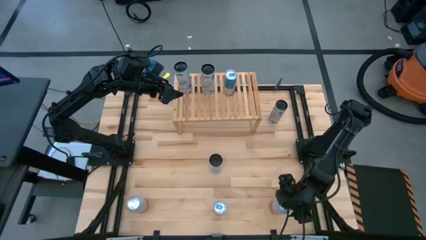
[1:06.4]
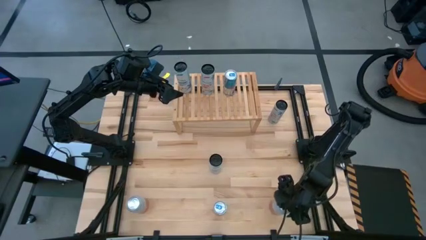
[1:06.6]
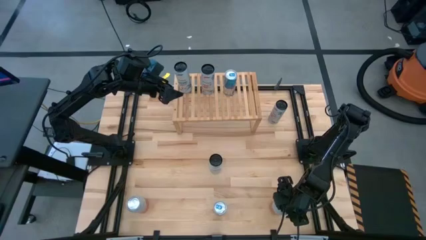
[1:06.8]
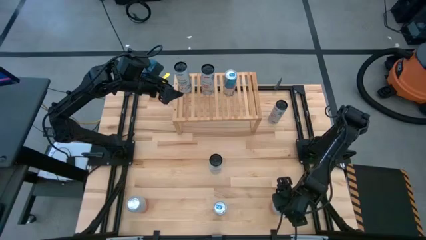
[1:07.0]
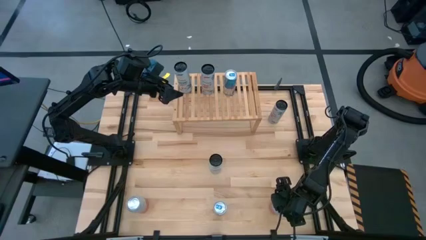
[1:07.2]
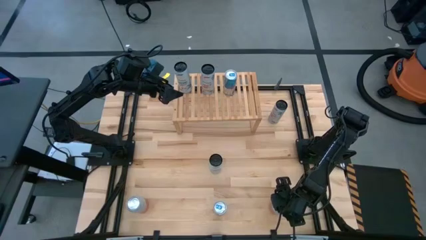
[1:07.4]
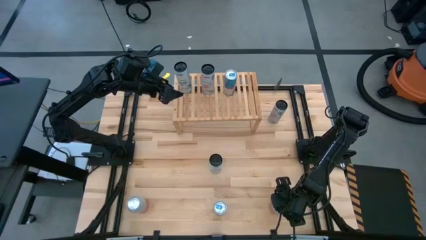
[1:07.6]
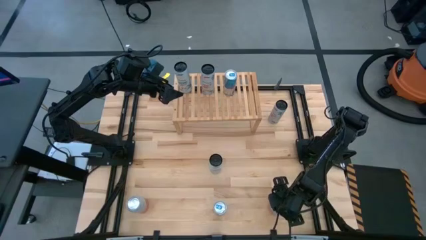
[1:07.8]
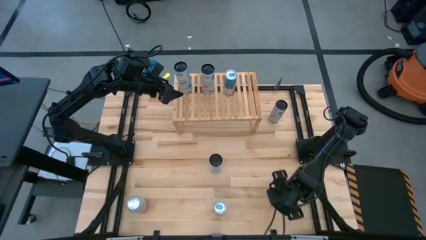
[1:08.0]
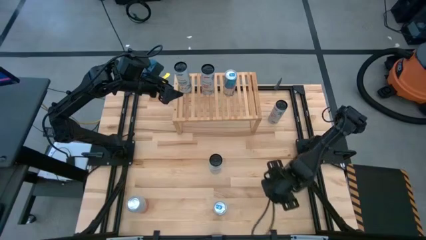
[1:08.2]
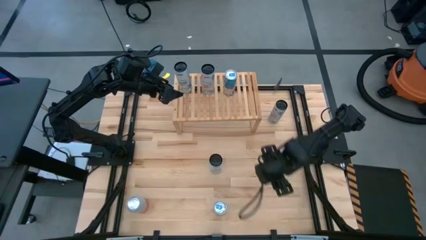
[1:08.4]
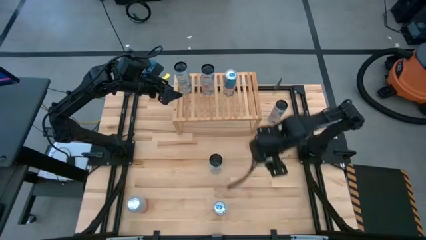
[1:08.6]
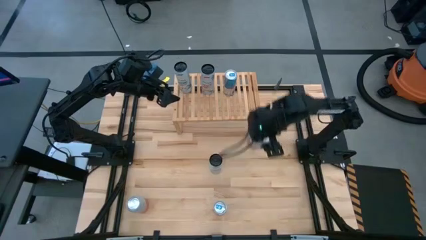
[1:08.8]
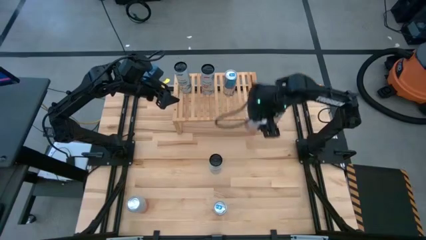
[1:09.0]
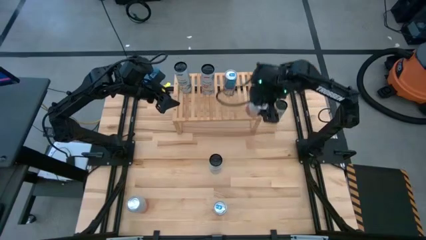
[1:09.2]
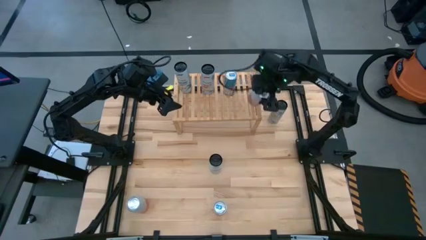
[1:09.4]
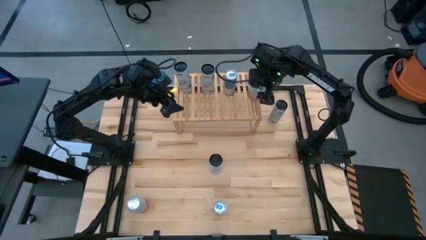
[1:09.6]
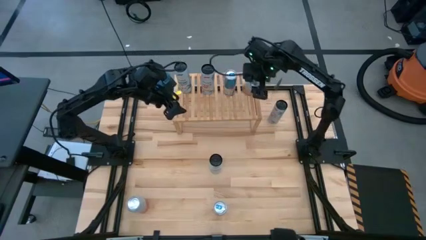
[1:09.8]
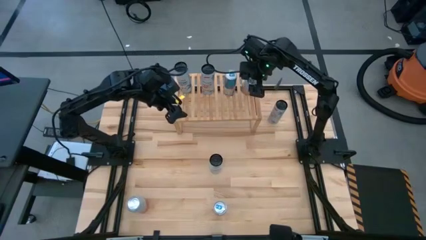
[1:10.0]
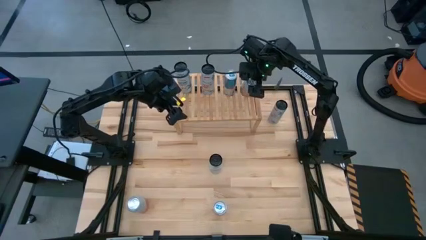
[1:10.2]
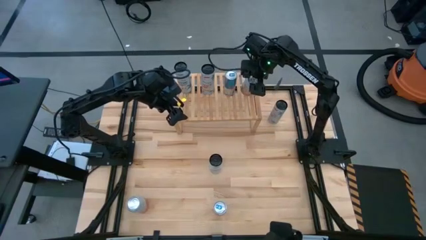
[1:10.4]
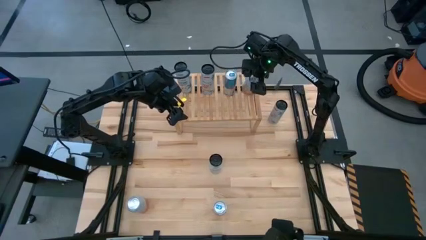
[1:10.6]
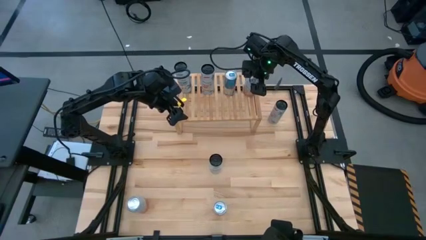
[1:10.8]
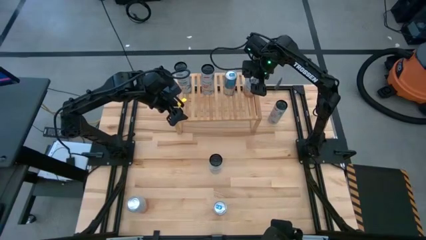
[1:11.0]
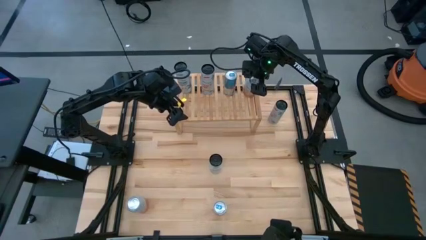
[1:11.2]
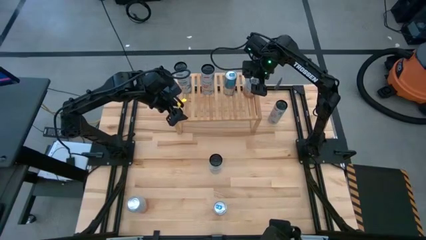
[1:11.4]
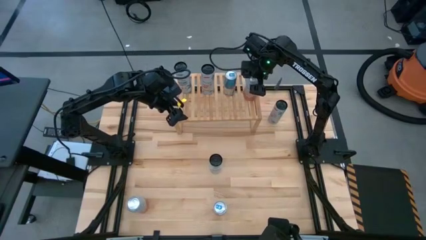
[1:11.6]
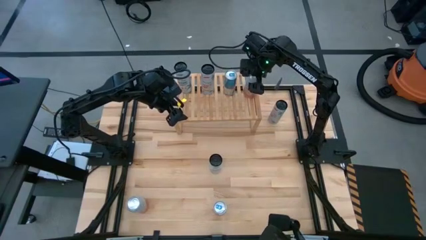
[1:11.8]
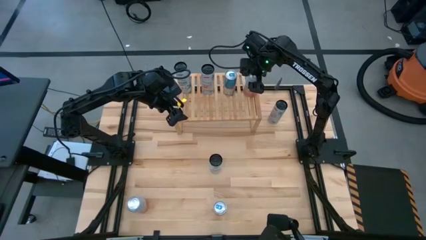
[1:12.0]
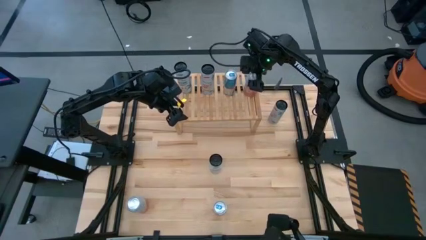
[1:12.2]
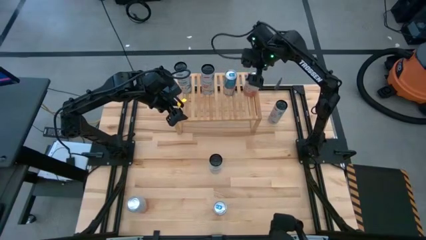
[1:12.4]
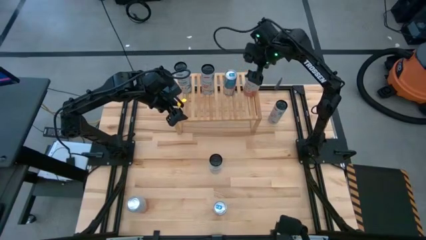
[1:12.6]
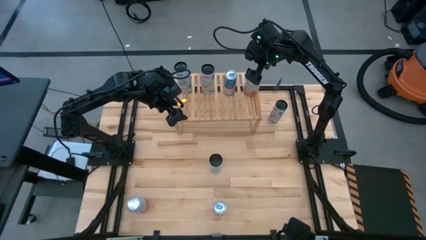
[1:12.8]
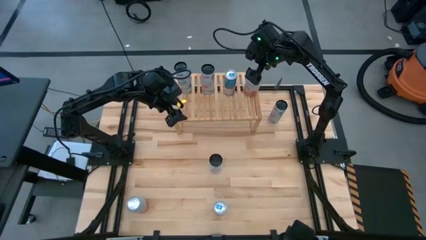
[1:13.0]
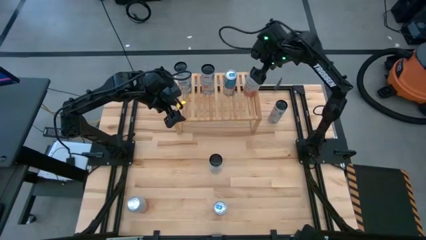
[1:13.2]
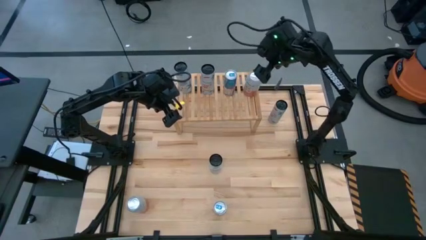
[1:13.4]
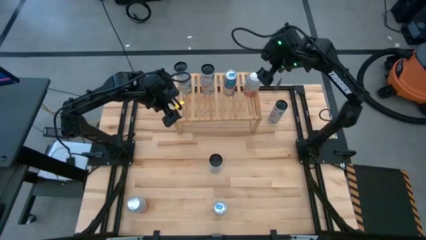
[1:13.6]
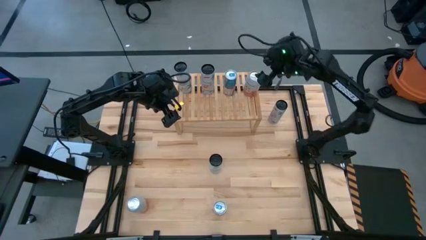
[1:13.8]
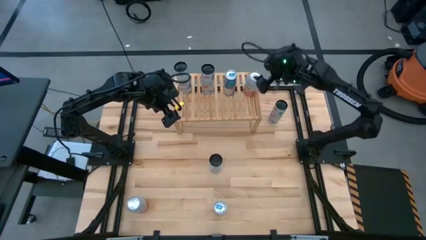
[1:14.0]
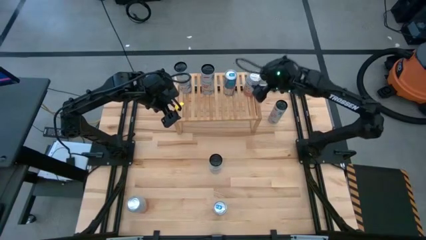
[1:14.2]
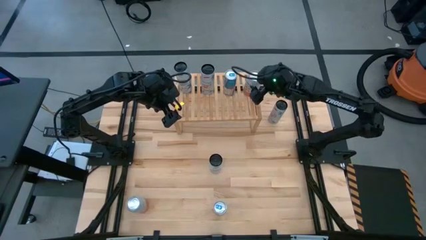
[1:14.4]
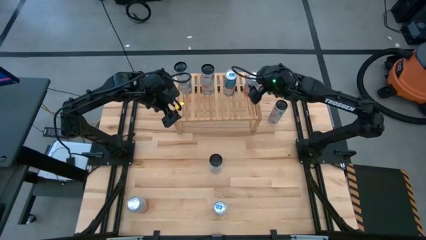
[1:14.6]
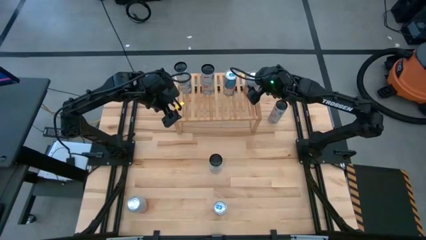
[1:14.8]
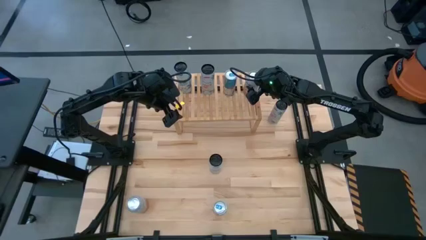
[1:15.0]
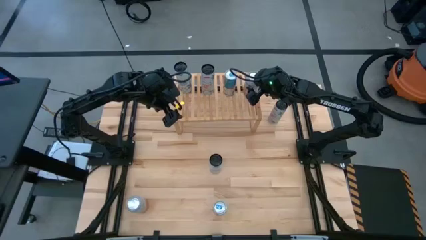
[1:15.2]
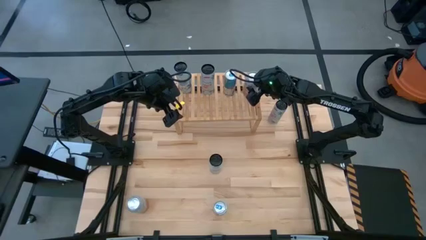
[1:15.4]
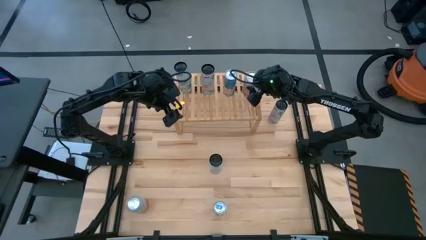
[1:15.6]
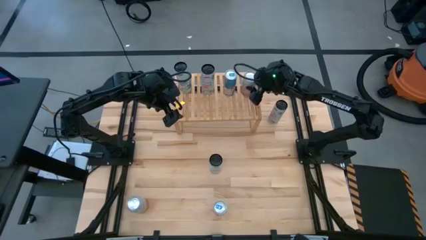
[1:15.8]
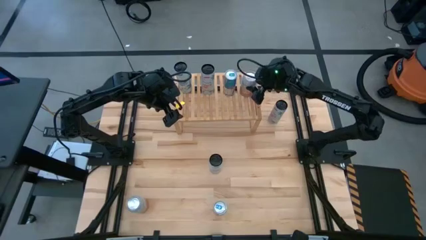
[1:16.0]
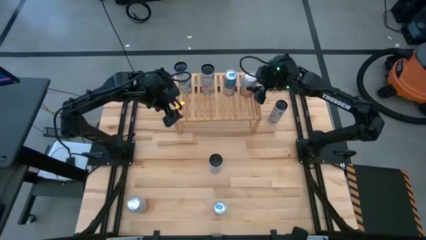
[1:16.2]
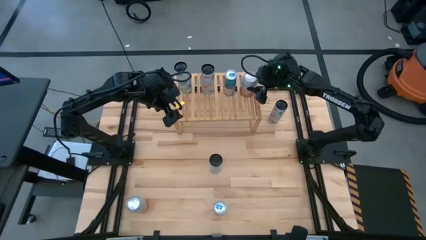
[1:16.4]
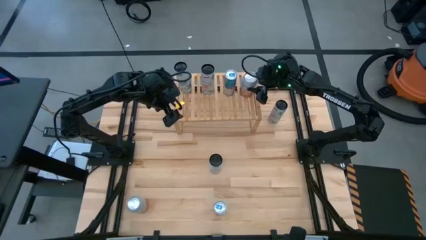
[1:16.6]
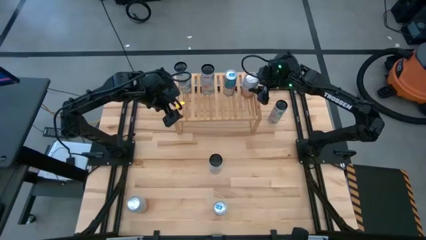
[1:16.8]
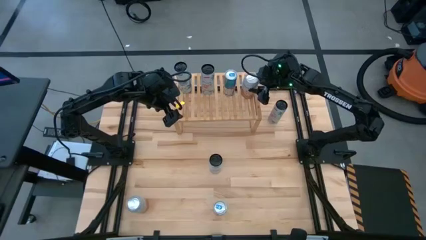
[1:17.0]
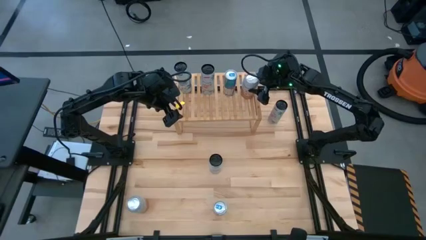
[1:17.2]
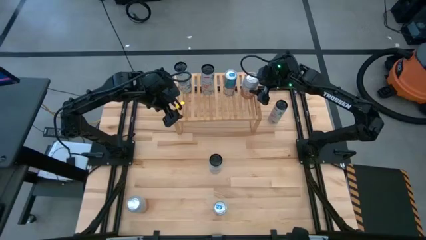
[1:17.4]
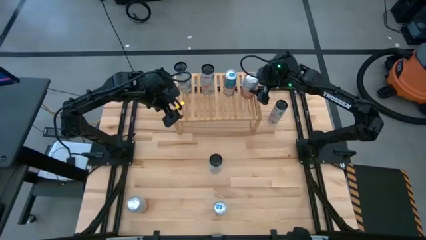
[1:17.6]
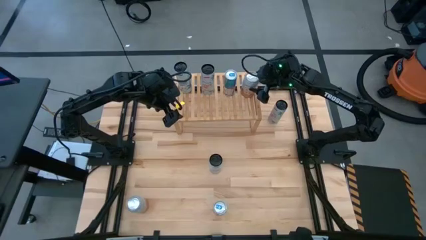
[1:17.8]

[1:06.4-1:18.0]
Task: Place canned beverage on shelf
Put the pink-white soda can on the shelf aligned with the other pink-white soda can

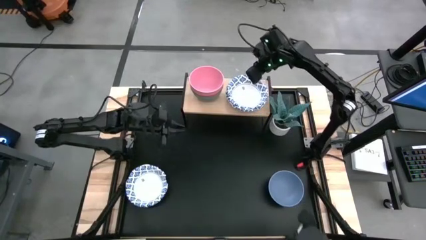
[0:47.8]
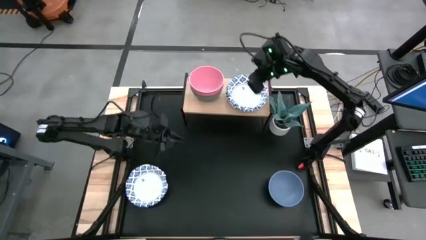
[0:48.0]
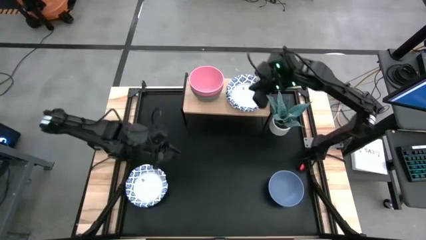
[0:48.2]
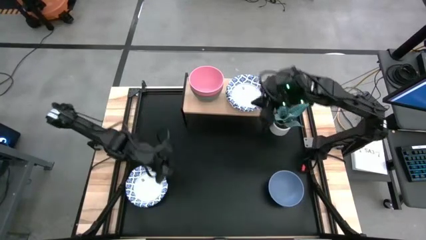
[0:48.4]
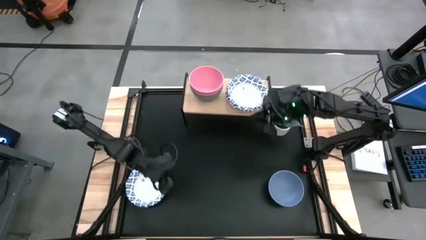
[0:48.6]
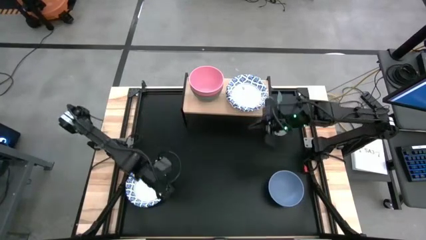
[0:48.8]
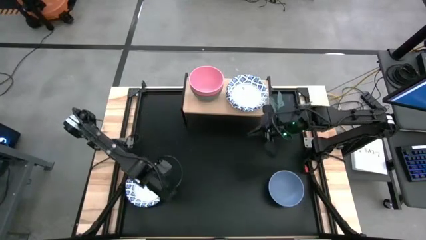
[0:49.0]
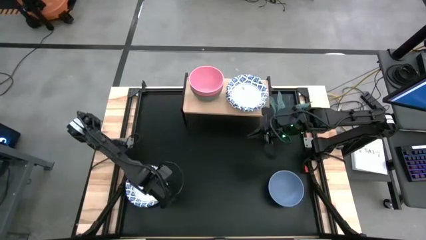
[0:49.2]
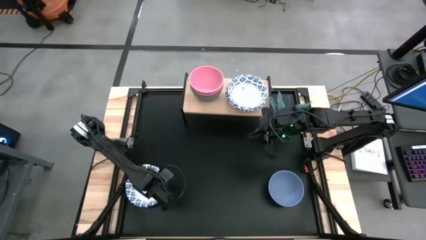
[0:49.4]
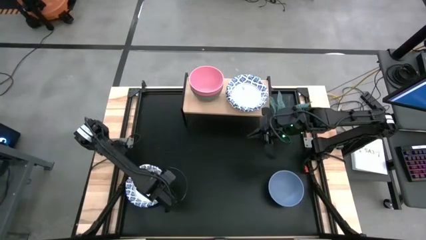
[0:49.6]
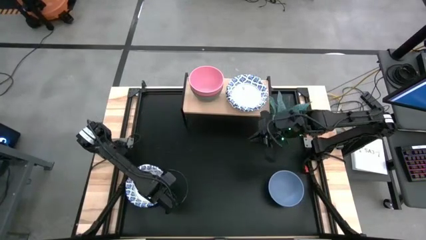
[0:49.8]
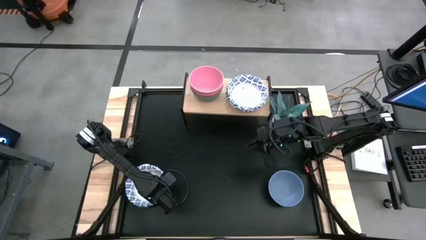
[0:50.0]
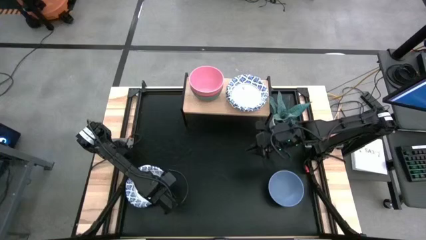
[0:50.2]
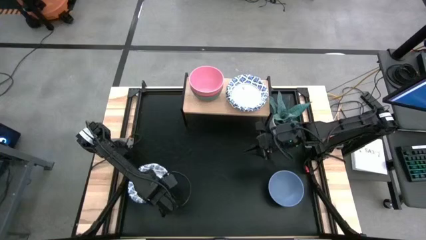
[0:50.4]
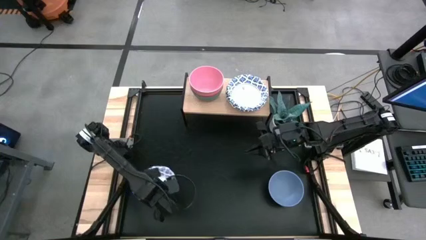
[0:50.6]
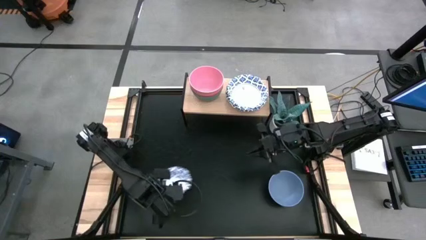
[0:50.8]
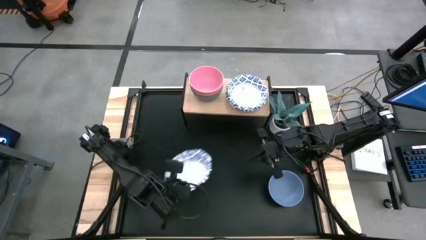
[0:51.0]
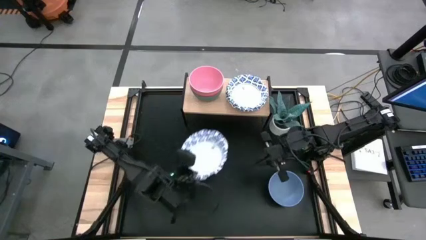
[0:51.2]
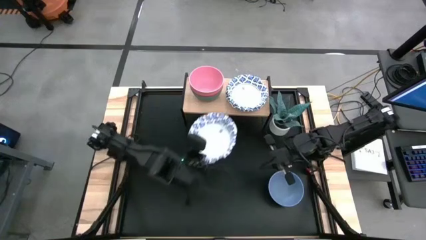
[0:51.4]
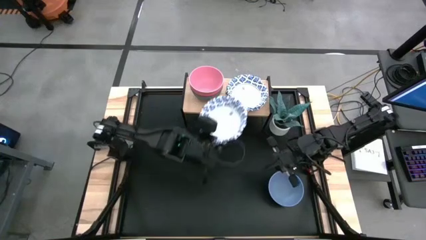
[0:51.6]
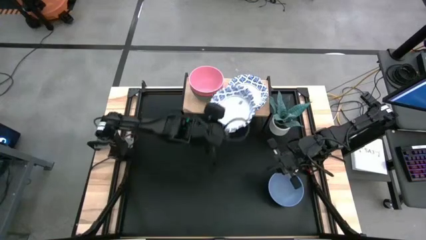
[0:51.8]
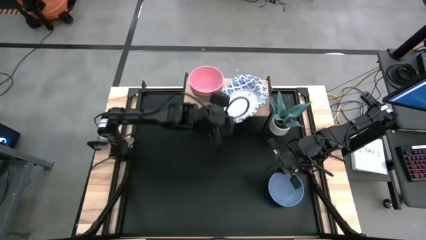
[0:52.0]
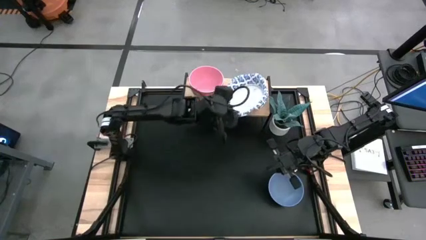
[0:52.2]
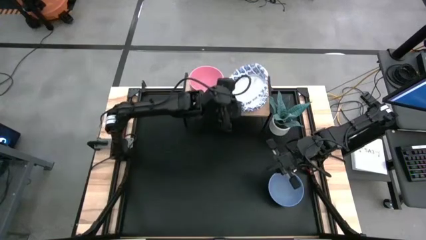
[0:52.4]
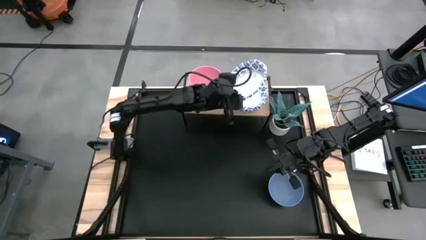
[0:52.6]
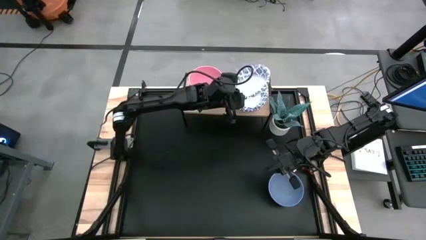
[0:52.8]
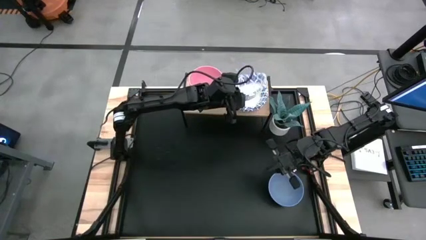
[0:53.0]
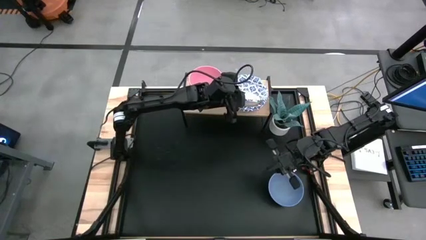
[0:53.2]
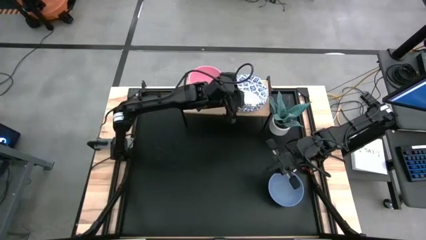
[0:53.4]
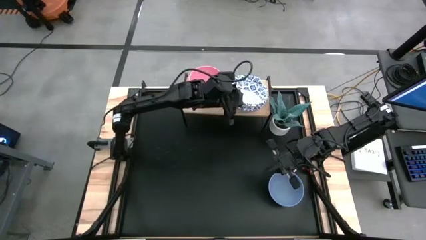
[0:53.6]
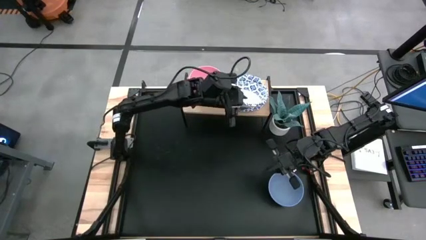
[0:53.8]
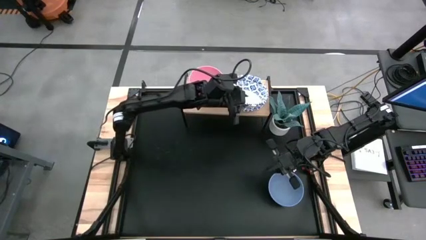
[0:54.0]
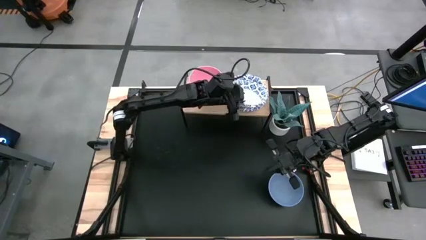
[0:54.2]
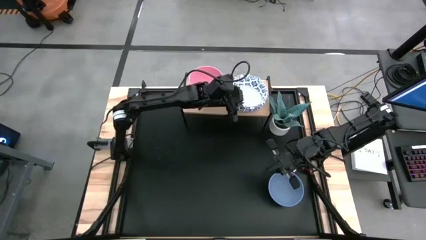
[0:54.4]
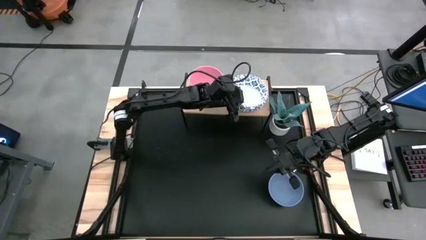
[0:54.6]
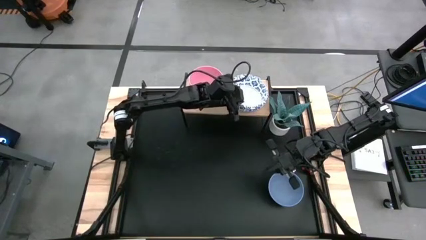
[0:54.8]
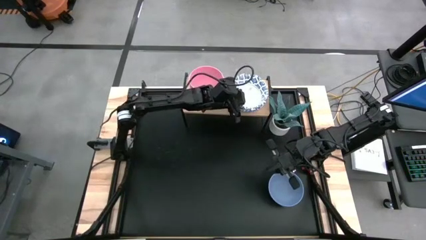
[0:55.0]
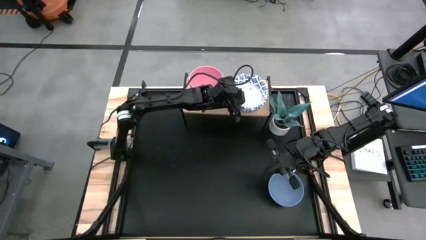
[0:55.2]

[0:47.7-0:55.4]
Task: Place and stack bowls onto a shelf
Stack the white with blue patterned bowl on top of the white with blue patterned bowl on the shelf
